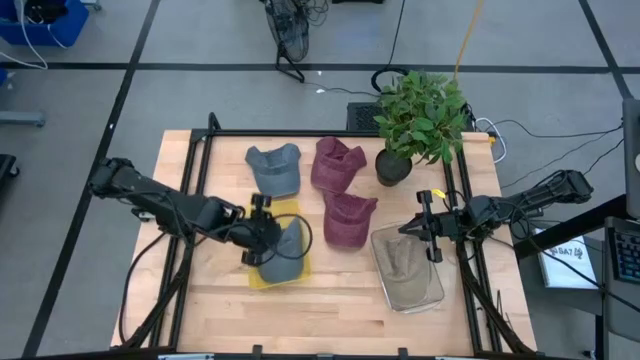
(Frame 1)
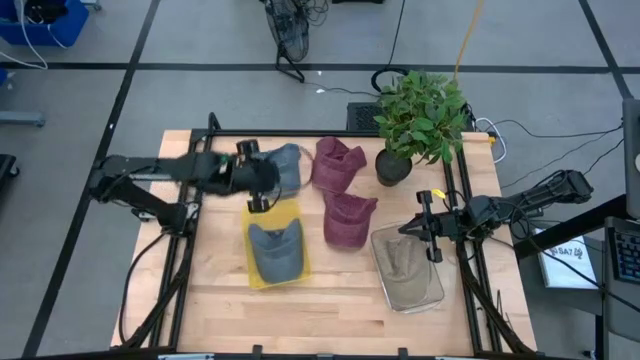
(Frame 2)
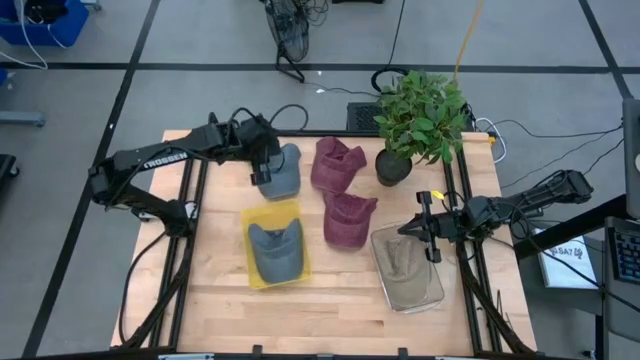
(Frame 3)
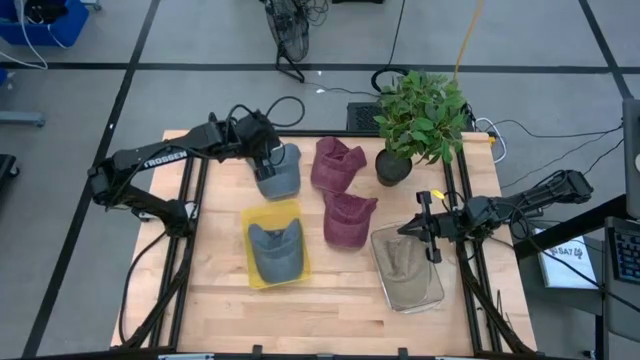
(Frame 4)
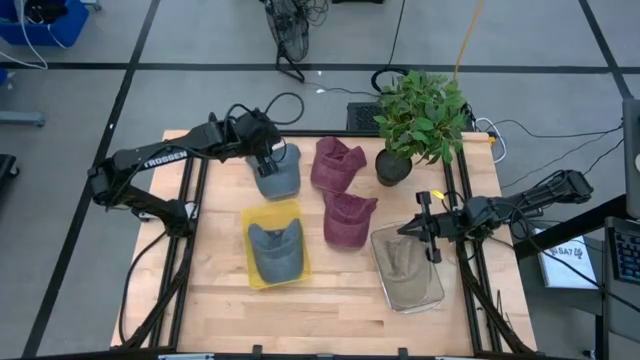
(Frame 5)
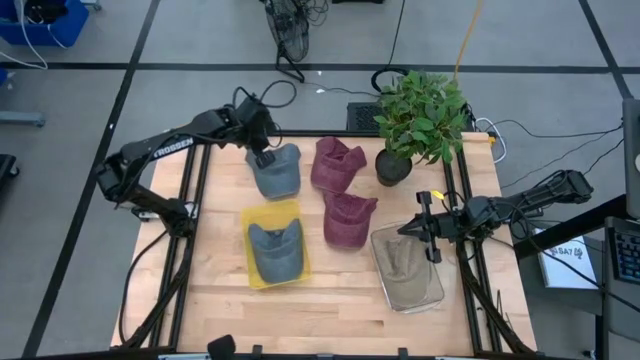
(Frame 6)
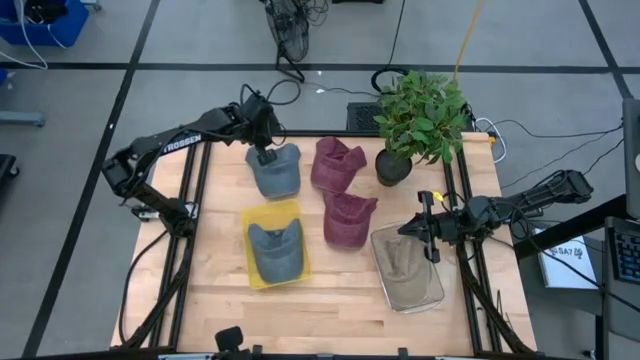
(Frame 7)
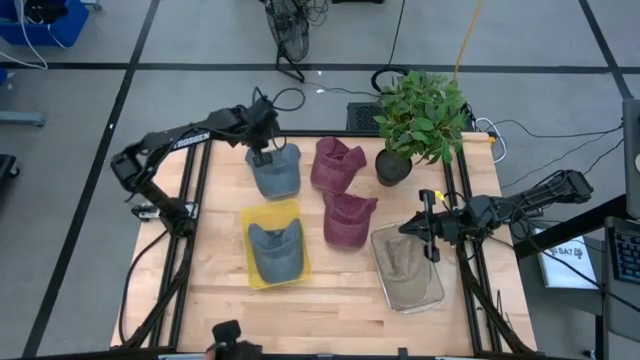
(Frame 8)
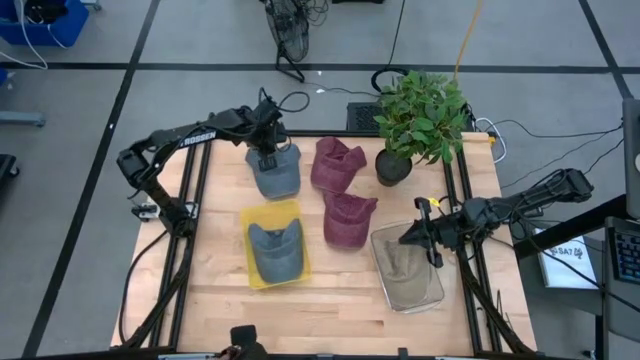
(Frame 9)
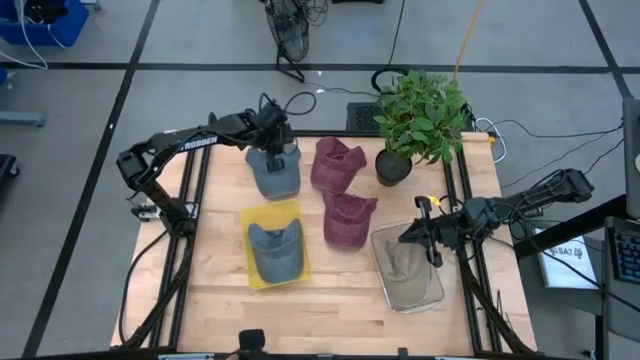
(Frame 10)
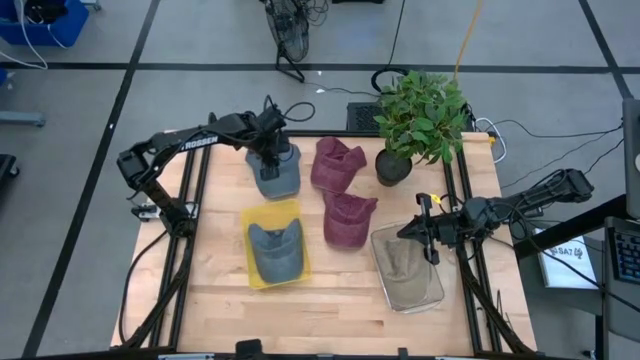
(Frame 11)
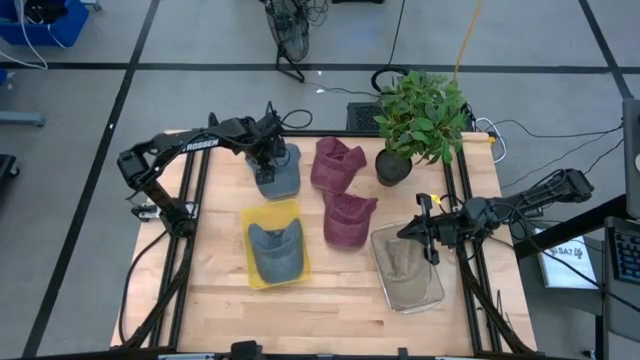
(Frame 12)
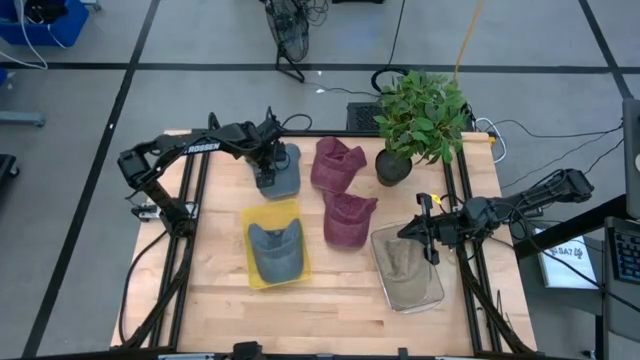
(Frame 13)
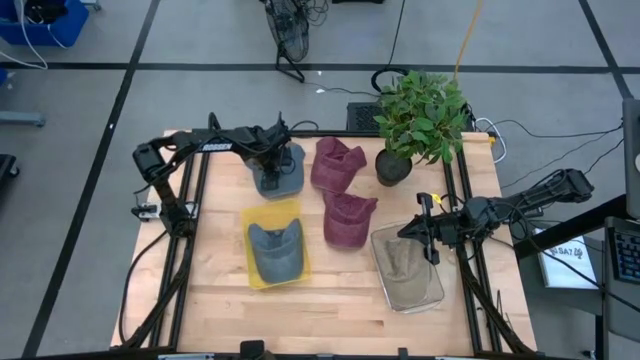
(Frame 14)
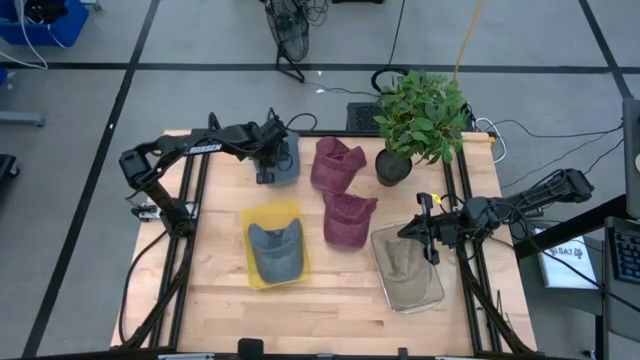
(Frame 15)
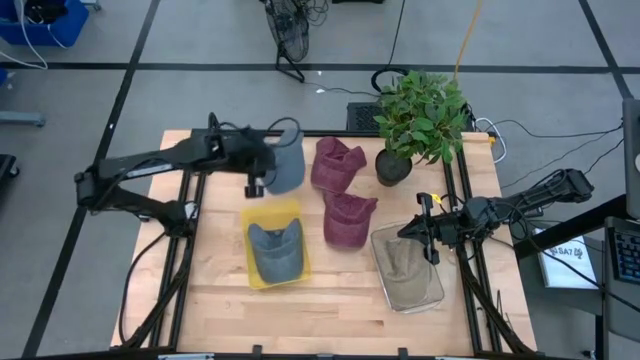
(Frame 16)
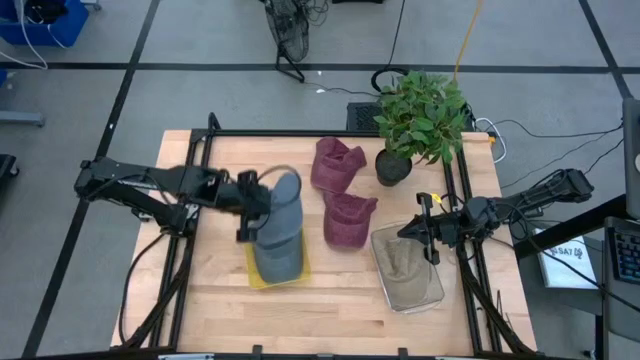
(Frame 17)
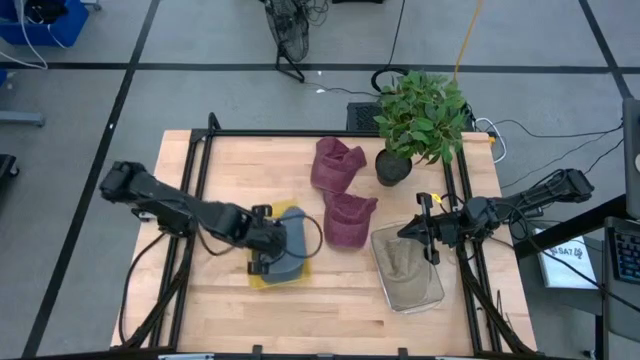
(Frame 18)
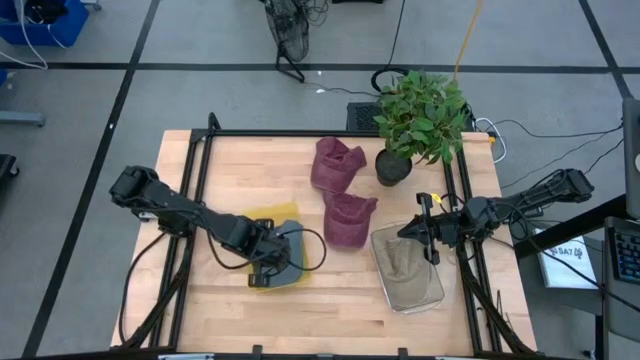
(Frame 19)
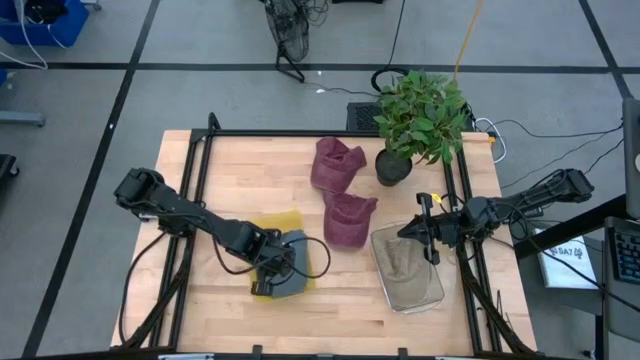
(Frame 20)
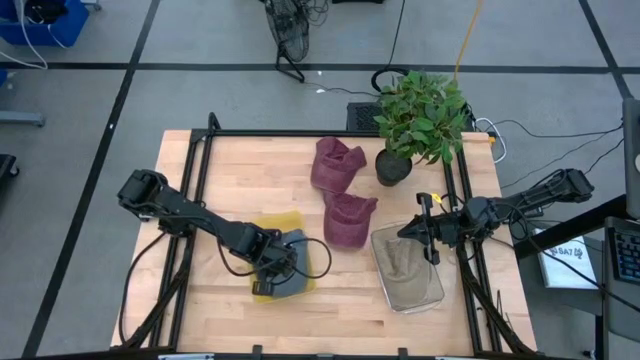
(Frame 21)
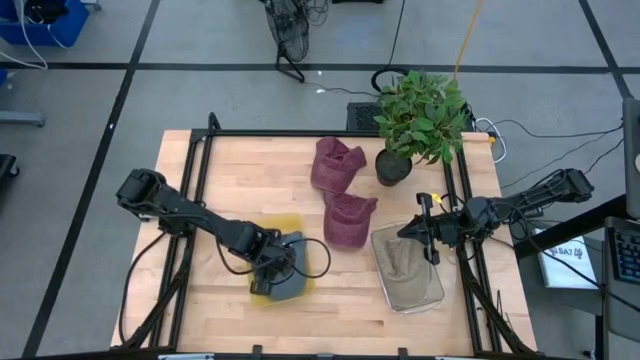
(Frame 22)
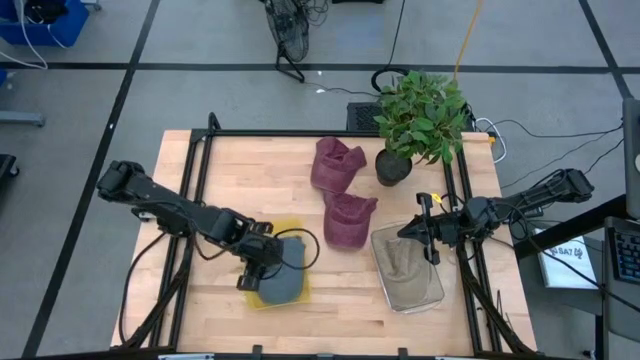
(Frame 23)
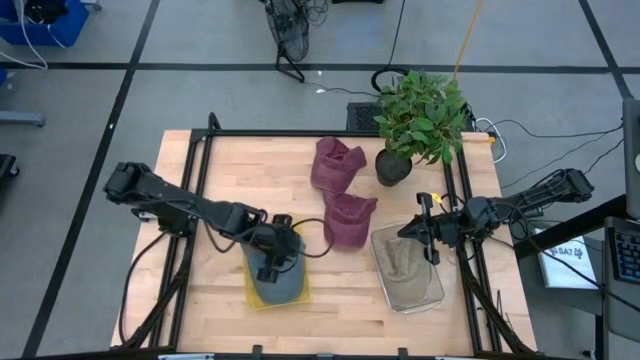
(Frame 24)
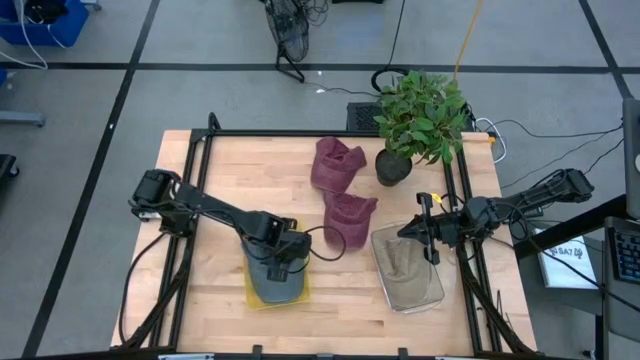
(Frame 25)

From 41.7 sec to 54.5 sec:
Task: Pick & Place hat
Put the blue cap into the yellow bin

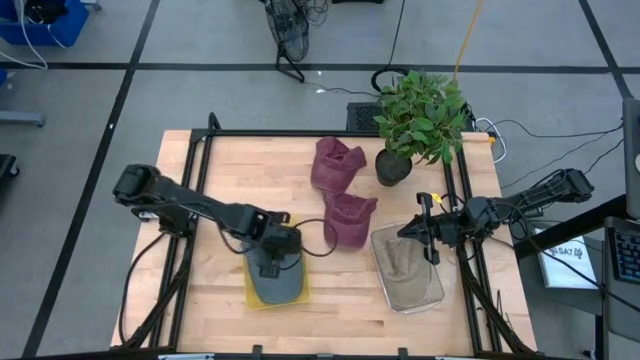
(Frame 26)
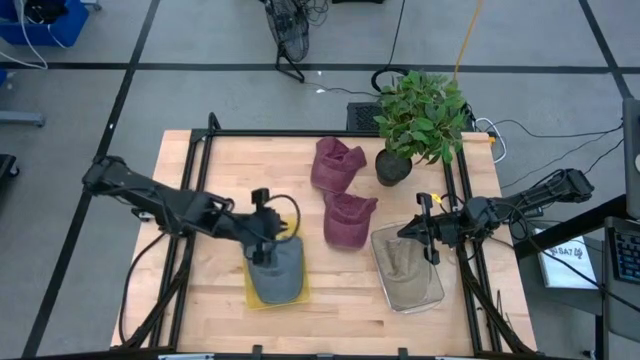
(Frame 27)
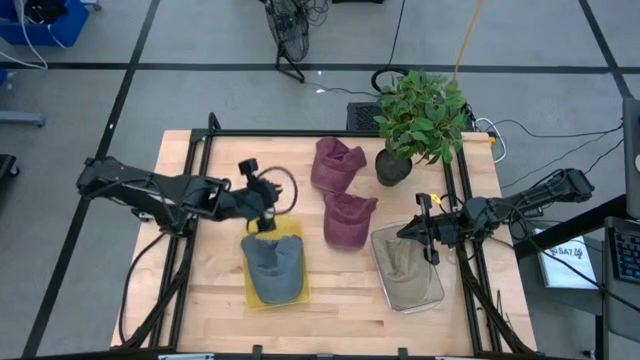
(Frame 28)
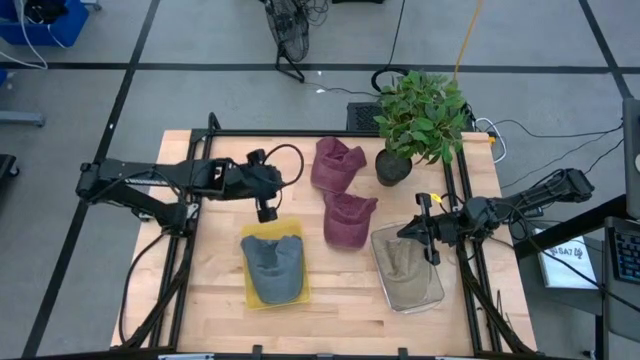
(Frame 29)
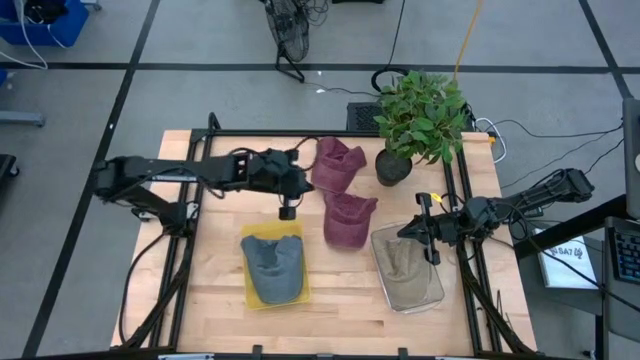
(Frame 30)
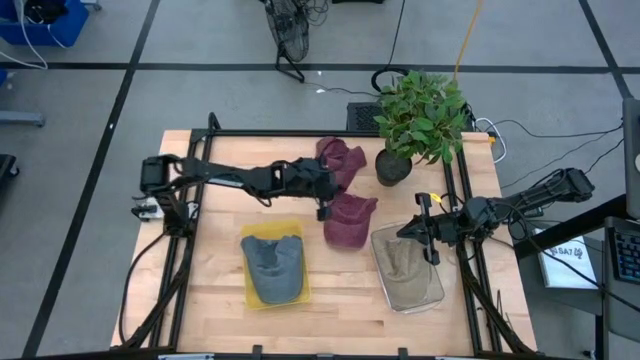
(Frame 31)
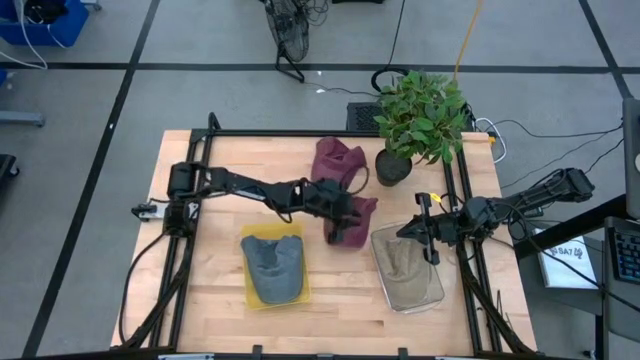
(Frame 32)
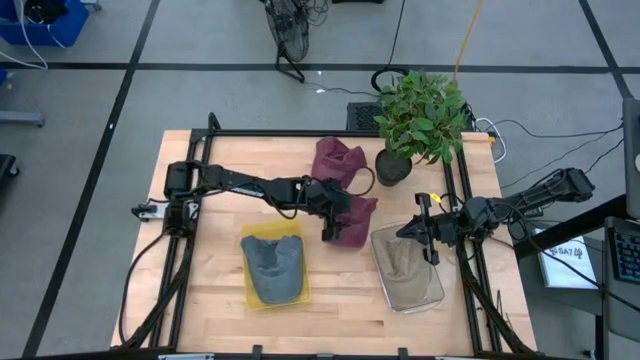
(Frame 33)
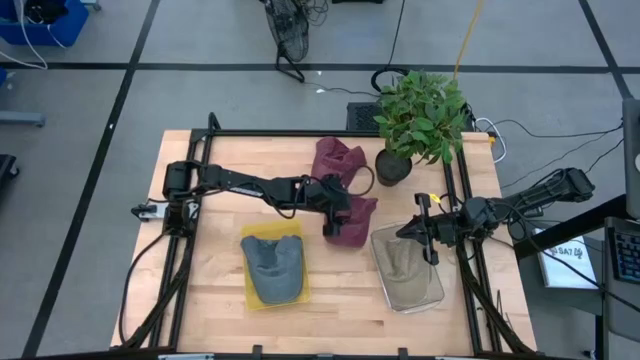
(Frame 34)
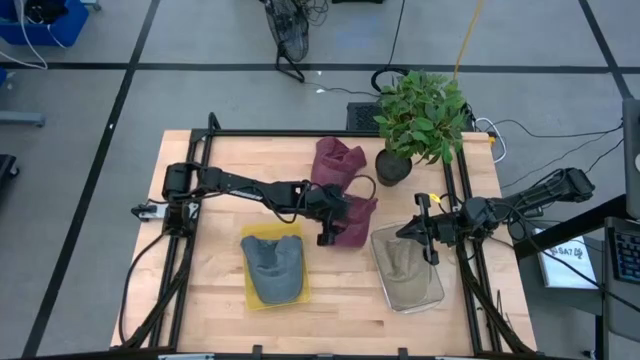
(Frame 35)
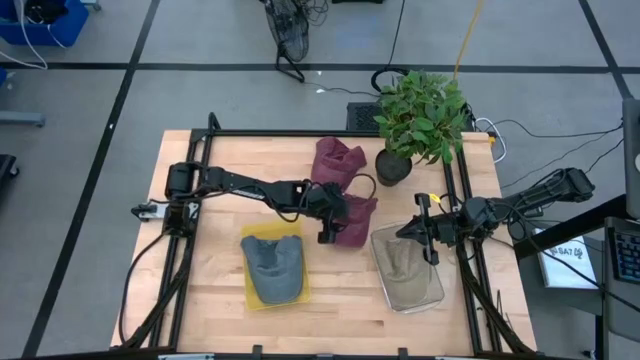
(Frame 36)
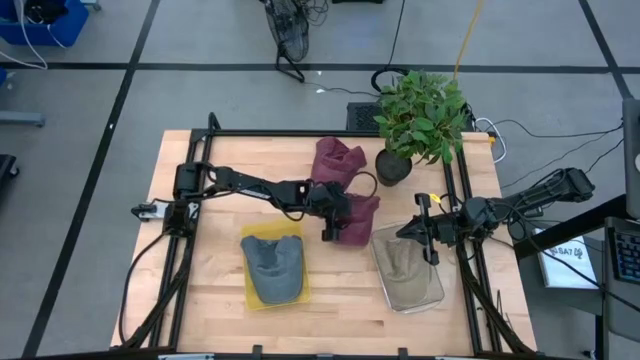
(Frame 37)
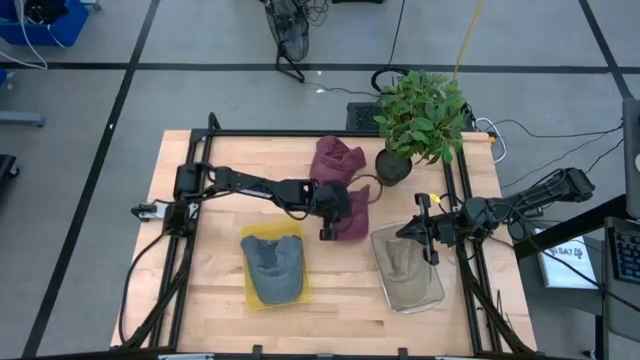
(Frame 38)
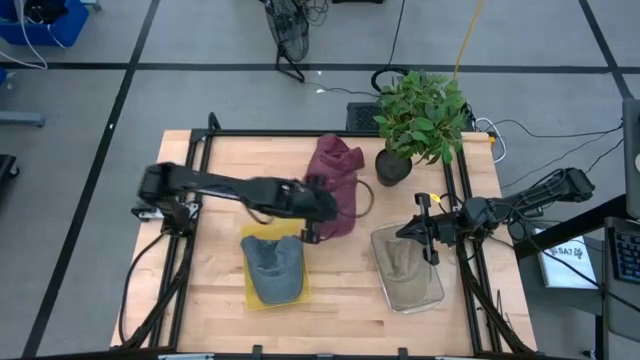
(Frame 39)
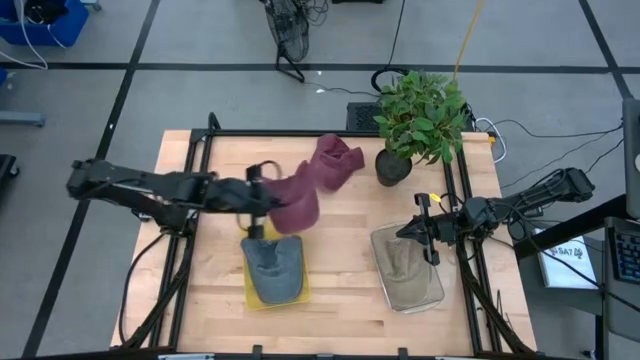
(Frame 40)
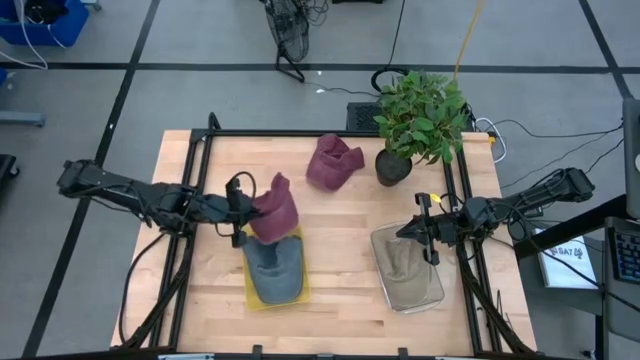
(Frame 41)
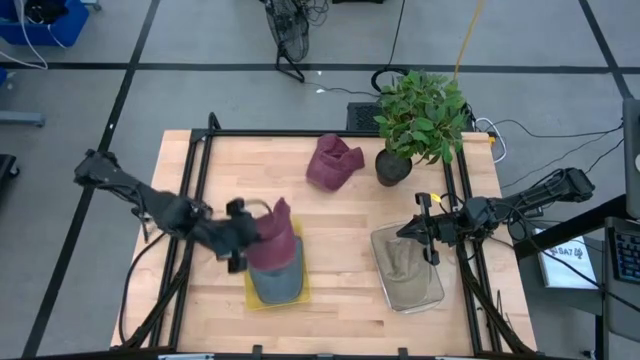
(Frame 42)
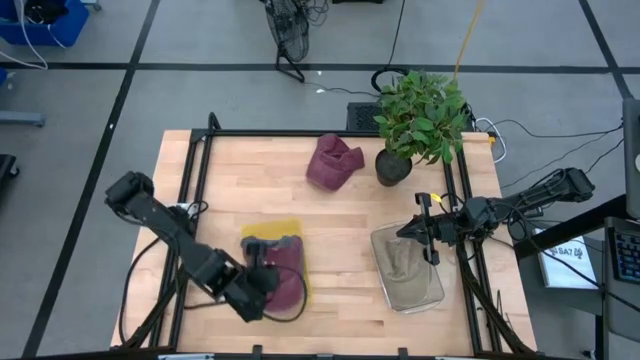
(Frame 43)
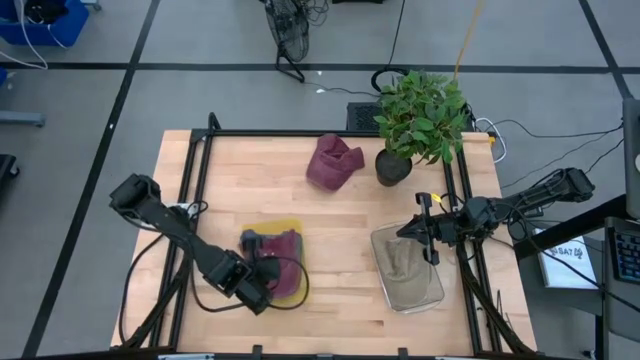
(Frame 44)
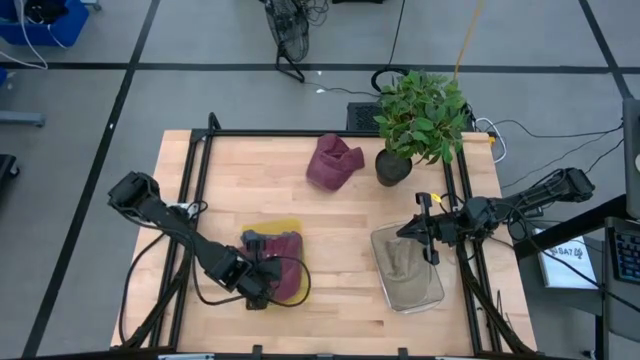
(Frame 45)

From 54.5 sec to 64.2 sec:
Put the bottom red cap into the yellow bin
